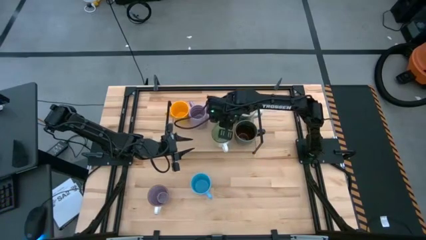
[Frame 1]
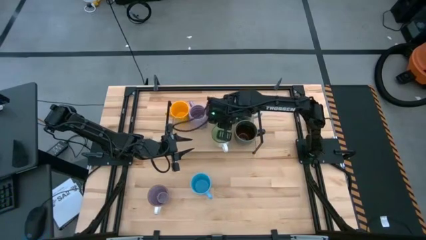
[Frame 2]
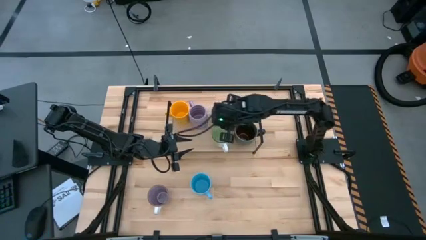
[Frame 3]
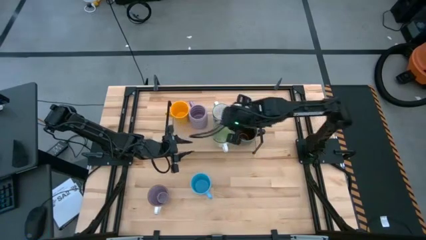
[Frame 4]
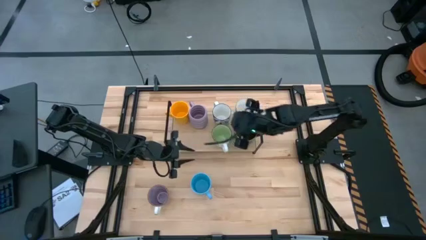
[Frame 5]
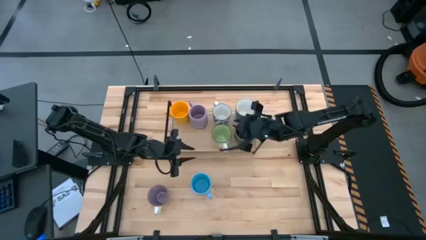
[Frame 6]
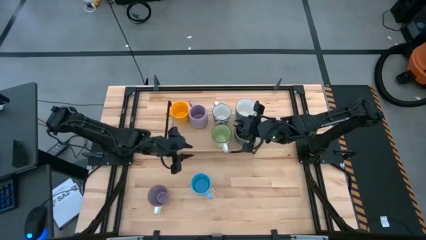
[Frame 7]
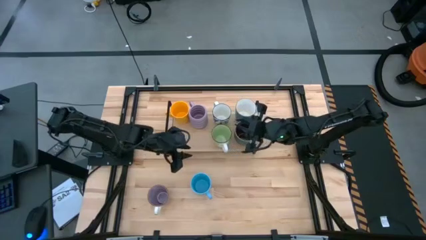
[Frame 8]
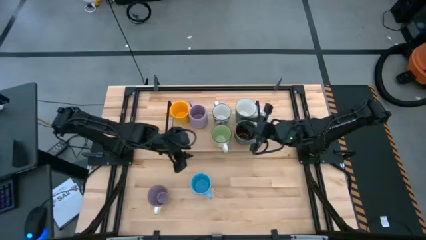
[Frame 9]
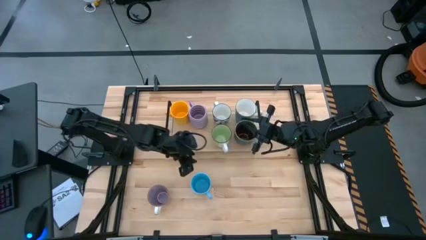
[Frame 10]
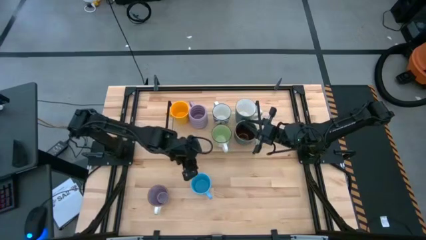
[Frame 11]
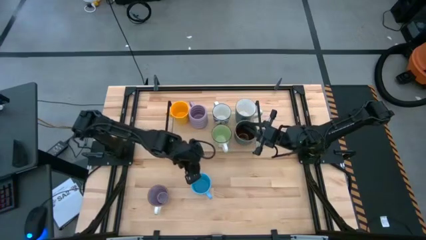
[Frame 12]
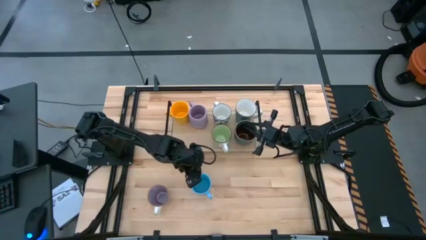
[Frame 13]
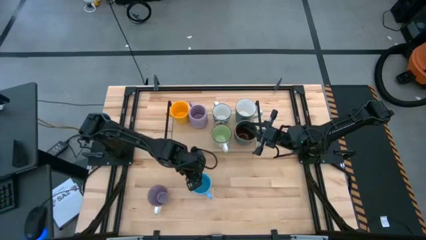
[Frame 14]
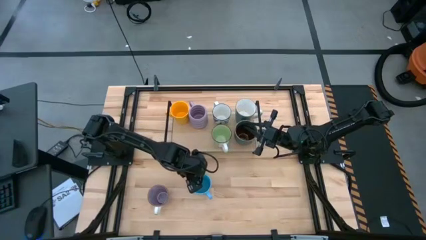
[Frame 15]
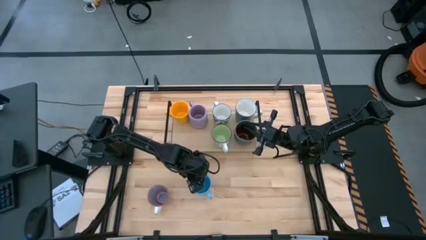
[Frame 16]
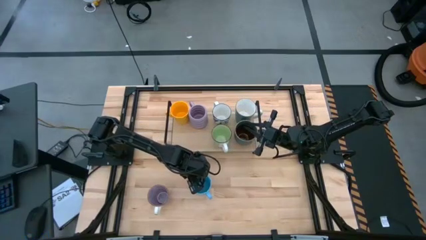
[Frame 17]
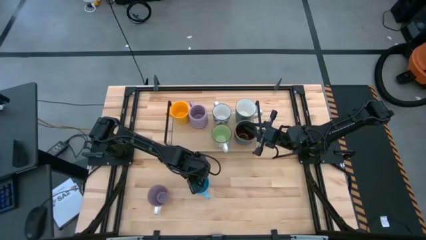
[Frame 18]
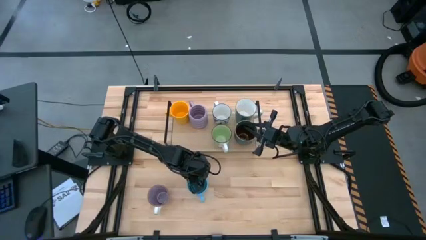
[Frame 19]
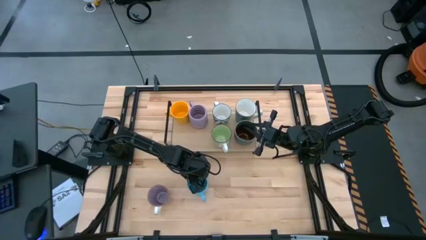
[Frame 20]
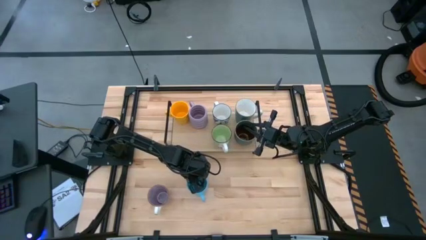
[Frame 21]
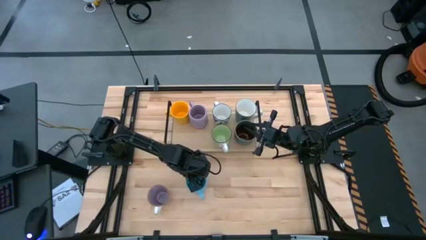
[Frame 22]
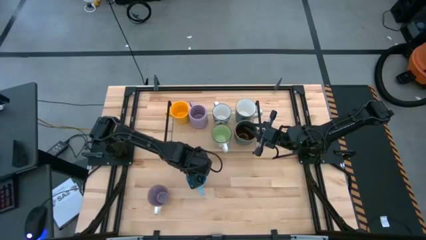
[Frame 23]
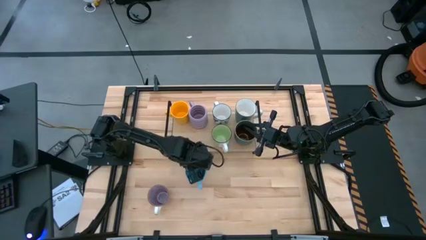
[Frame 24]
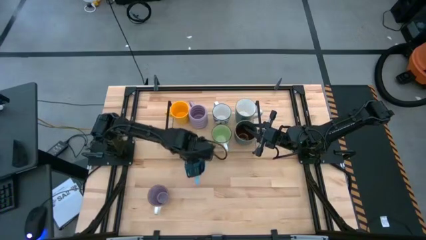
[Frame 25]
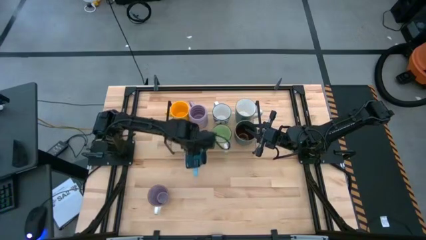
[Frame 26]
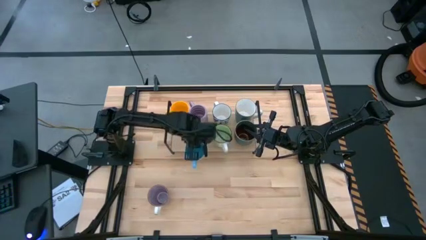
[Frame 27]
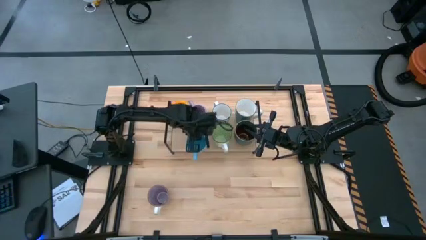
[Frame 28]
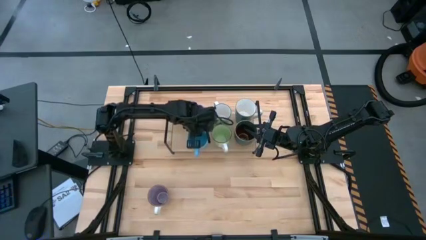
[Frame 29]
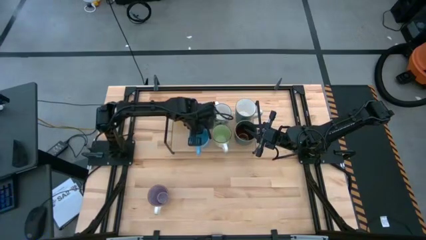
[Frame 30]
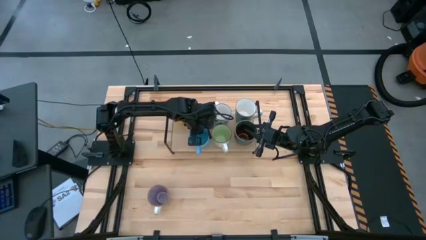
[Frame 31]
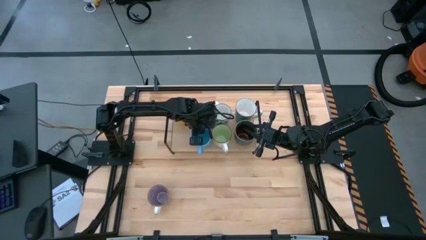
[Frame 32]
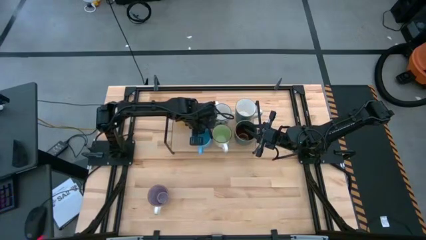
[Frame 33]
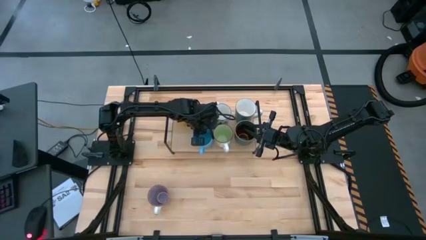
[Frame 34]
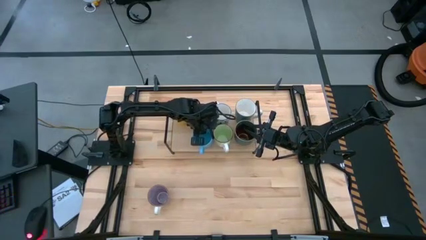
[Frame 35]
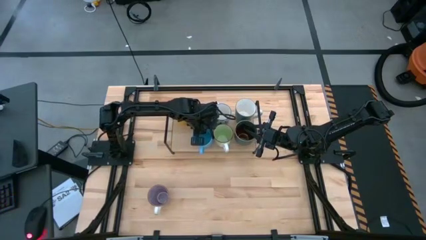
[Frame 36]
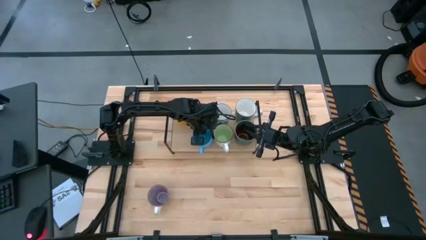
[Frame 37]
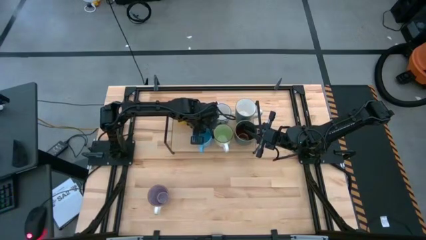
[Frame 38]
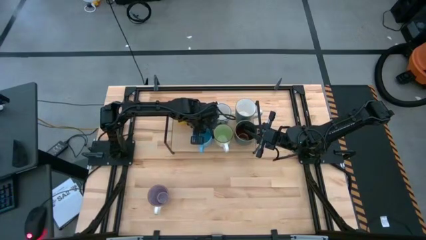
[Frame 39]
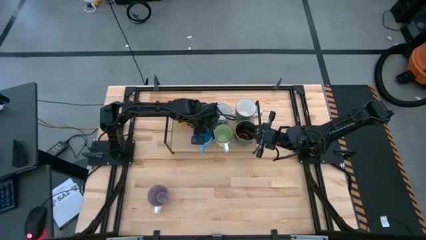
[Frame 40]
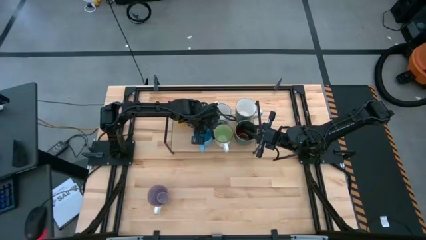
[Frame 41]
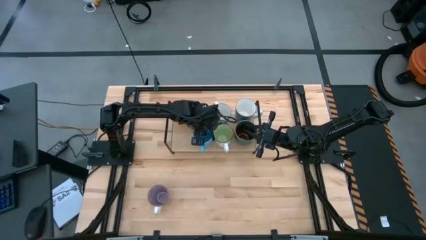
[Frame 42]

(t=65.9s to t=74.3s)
Task: Place coffee mugs
Put the blue mug on the shelf

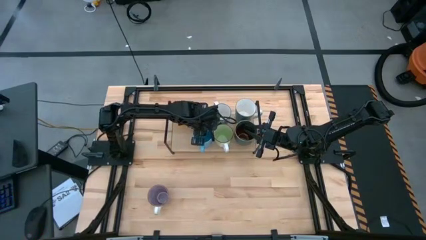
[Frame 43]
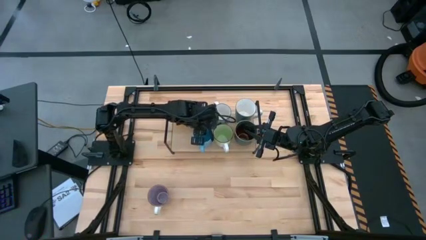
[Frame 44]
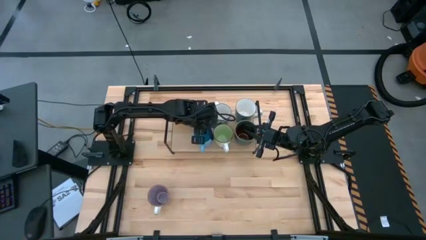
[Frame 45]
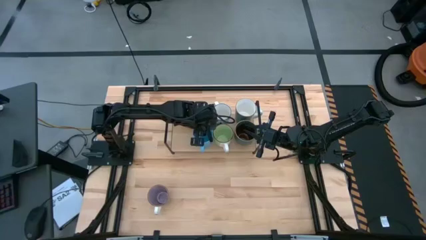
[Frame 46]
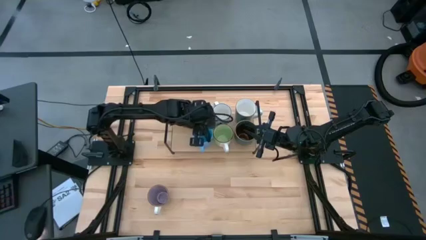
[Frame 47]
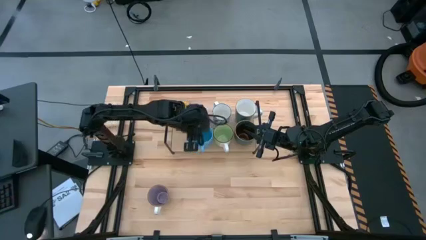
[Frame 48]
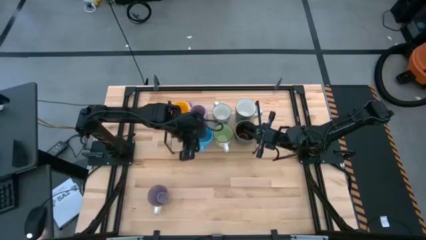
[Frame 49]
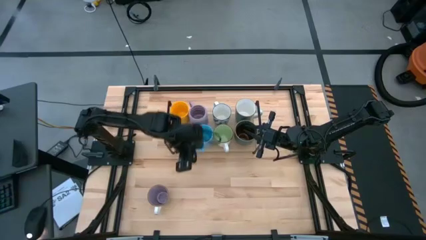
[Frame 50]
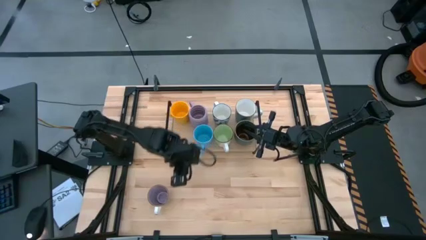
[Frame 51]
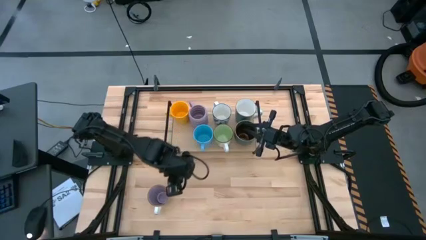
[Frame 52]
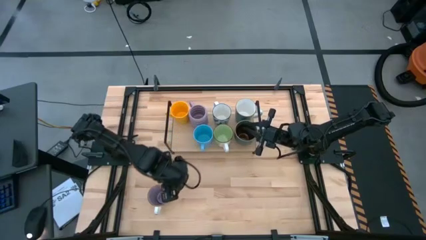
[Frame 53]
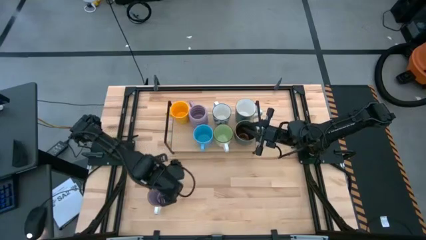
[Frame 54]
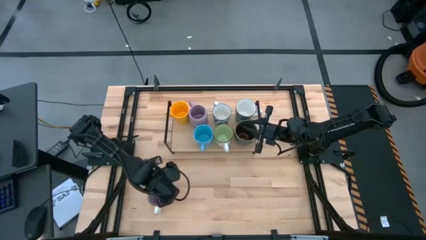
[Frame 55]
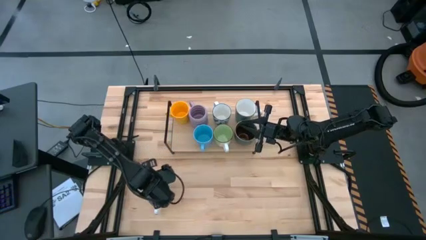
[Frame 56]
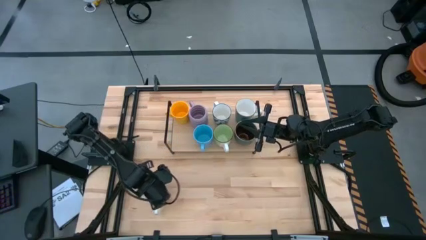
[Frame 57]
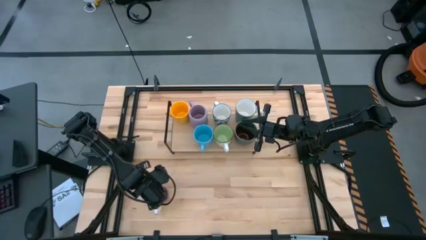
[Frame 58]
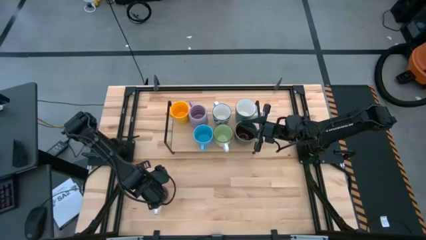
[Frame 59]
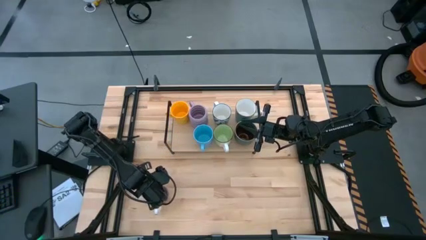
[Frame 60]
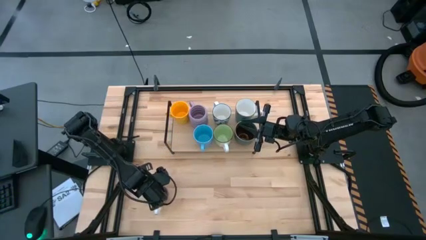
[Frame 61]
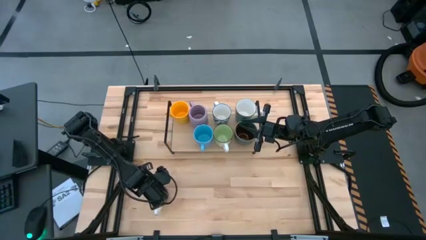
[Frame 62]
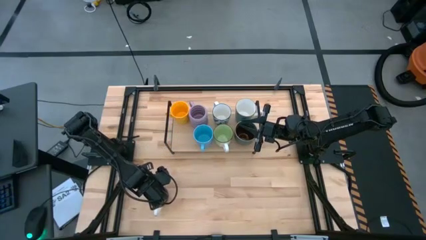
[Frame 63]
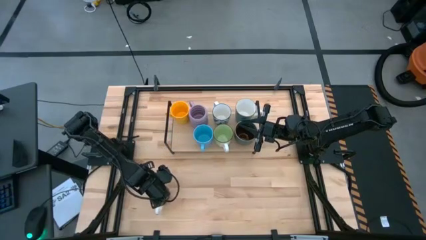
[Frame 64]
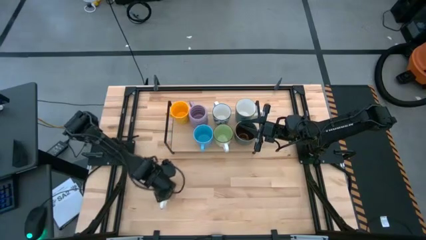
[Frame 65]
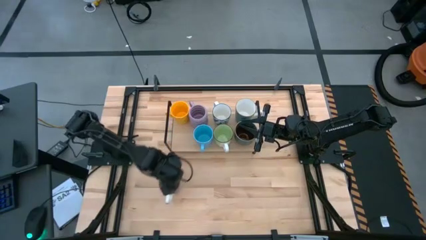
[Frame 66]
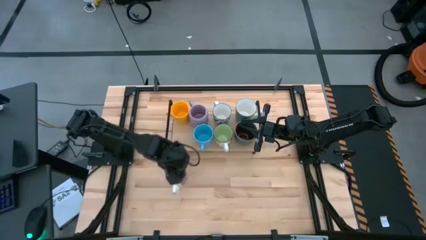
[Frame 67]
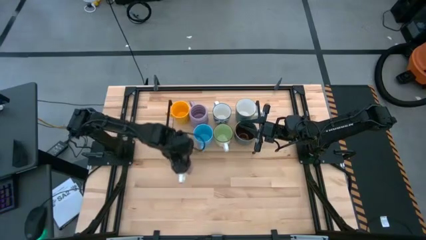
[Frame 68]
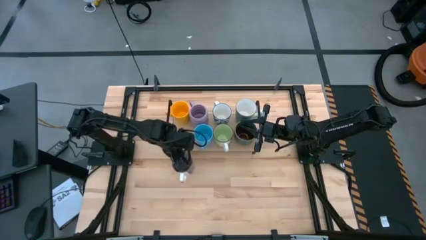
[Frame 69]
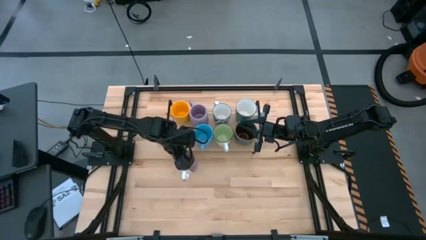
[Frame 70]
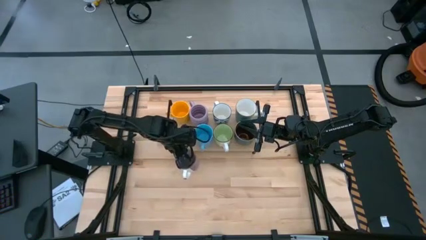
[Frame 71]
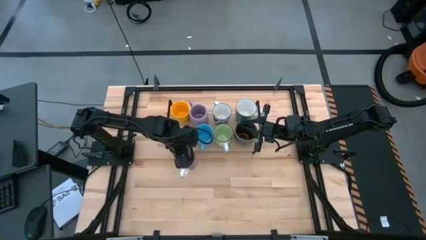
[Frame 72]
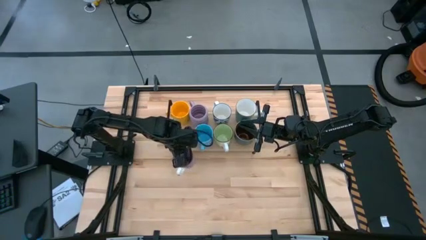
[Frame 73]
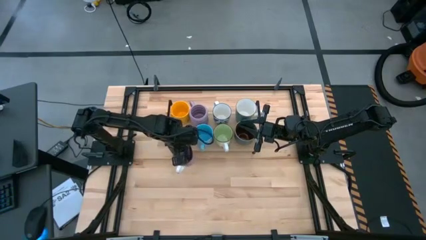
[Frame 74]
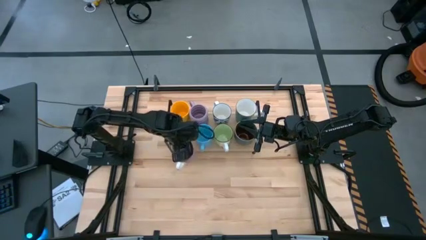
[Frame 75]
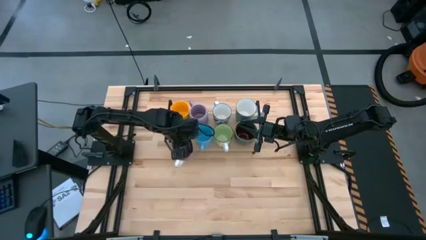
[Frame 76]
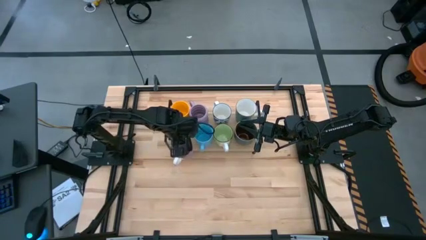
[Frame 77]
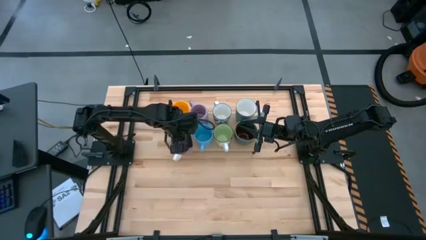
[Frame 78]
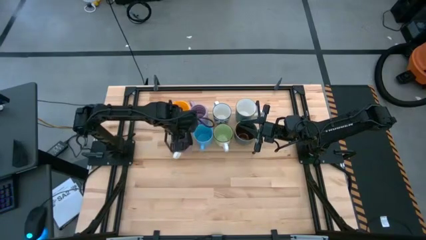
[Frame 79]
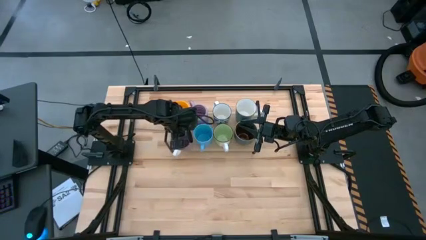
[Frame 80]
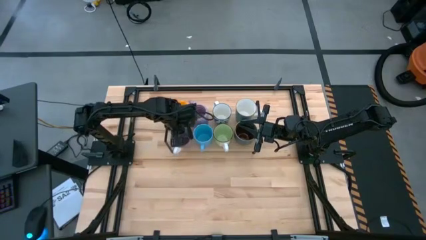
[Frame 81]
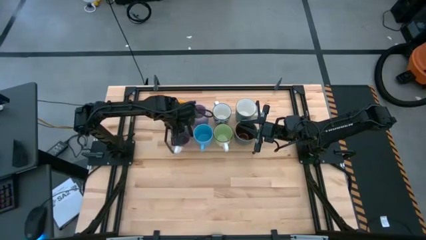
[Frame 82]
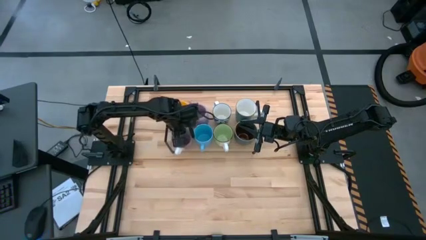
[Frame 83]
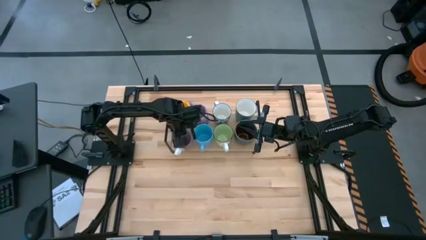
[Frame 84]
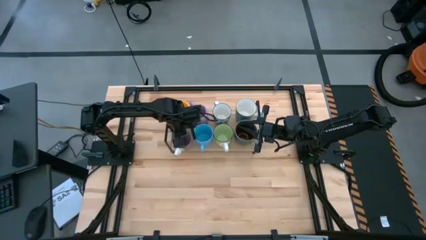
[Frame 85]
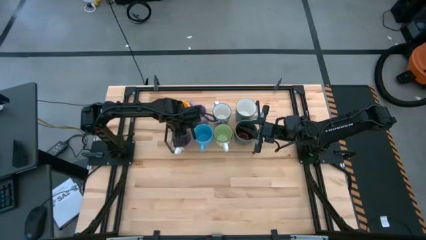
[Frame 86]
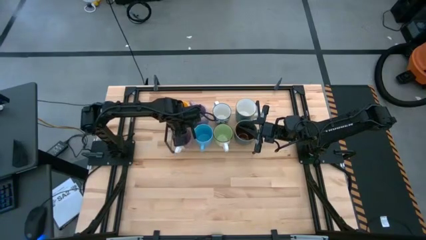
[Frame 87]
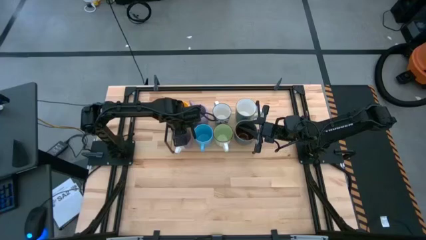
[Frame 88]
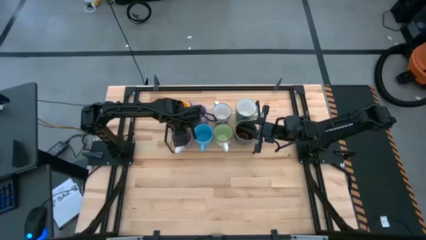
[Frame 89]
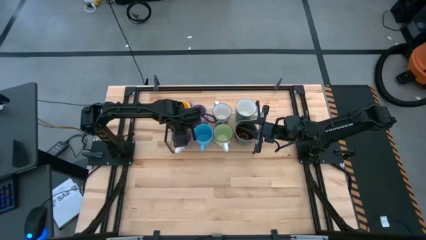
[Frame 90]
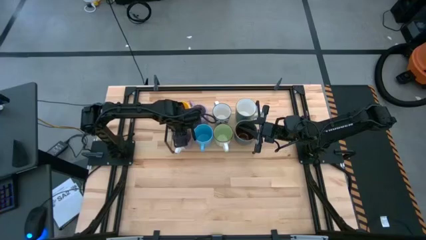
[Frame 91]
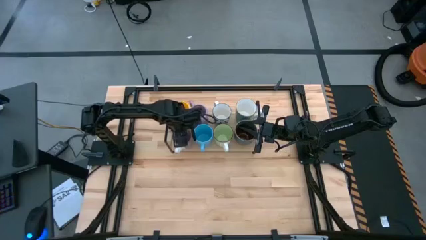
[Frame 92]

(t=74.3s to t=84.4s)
Put the purple mug on the shelf
